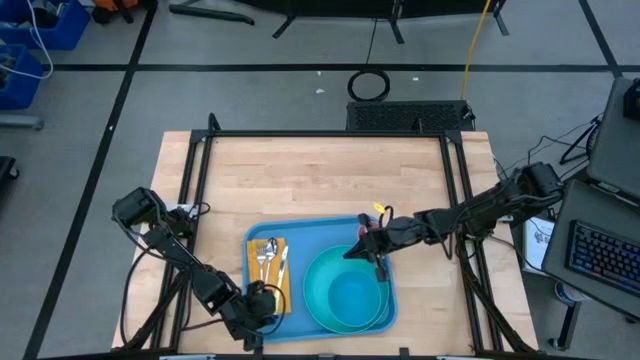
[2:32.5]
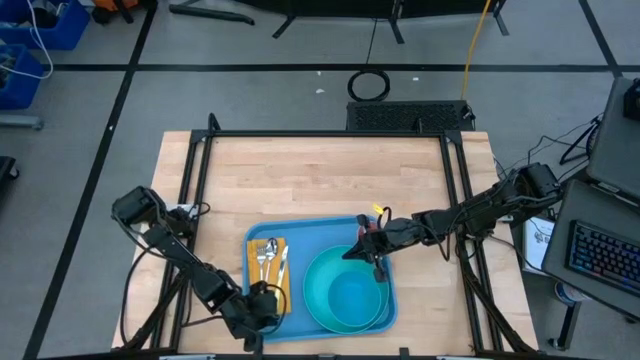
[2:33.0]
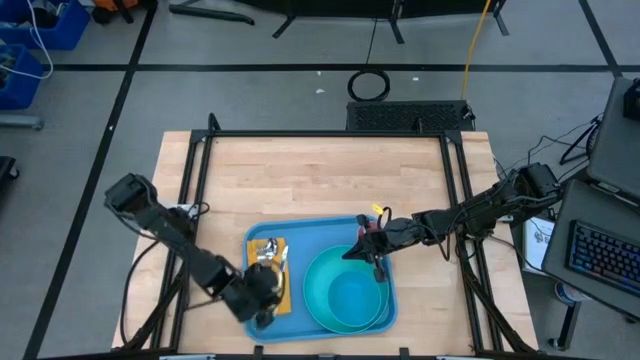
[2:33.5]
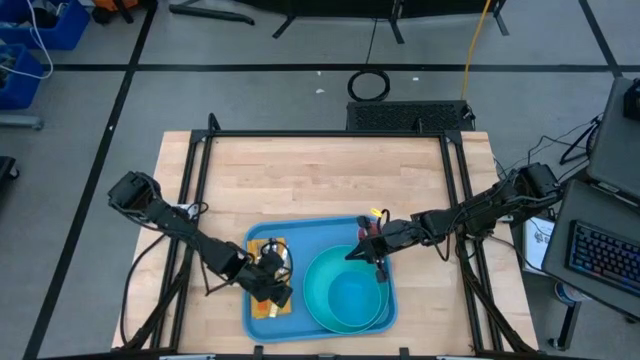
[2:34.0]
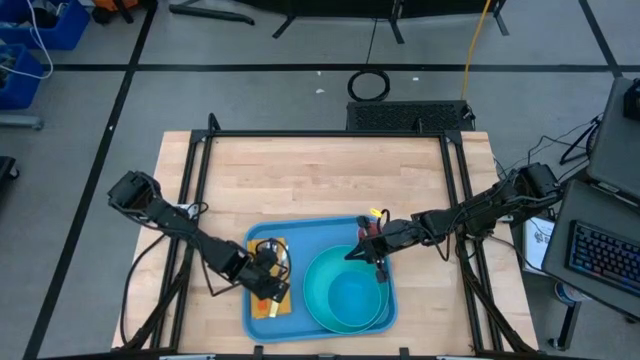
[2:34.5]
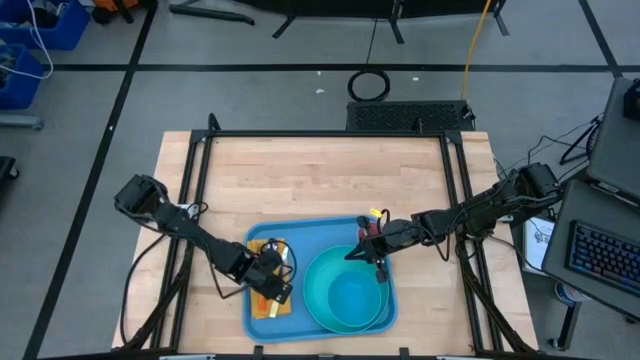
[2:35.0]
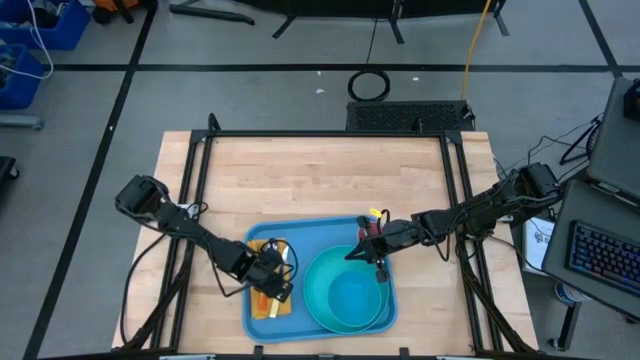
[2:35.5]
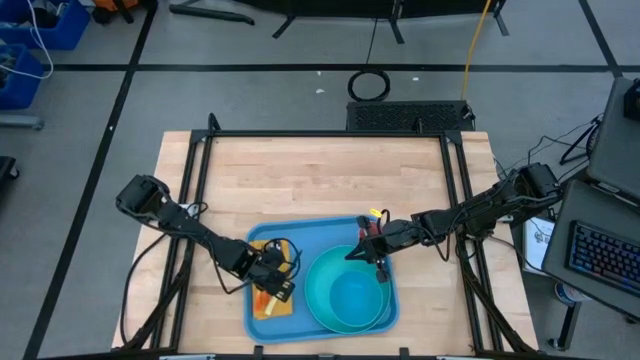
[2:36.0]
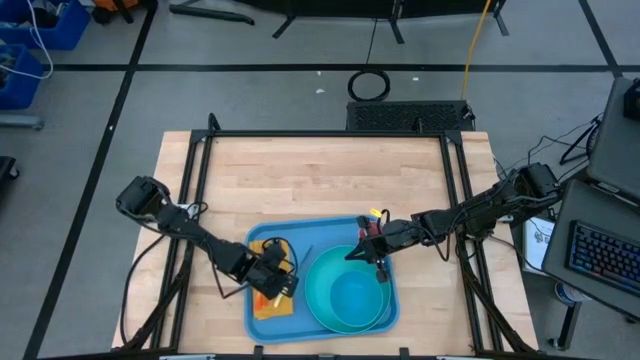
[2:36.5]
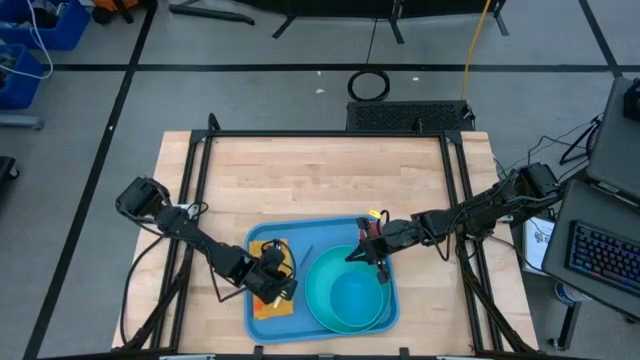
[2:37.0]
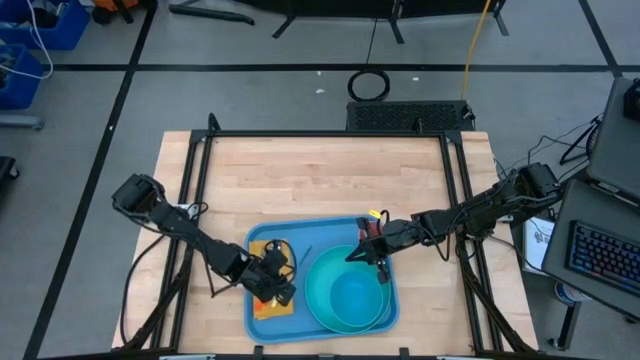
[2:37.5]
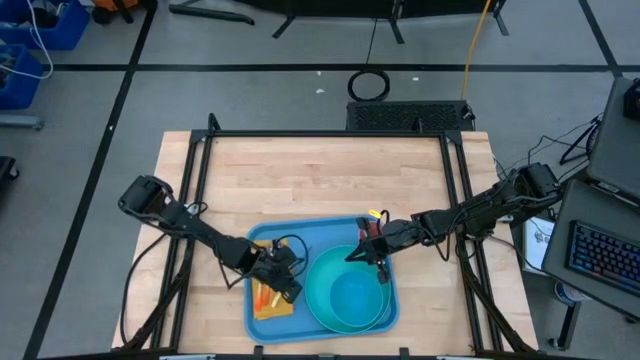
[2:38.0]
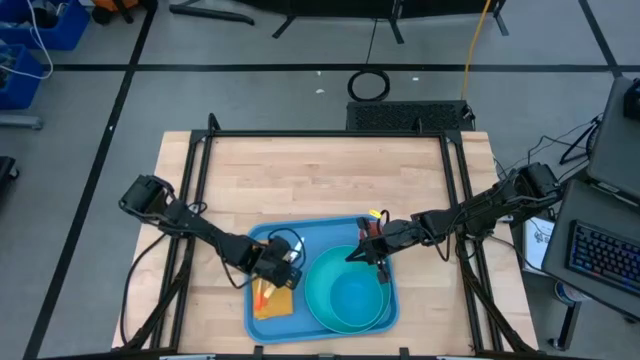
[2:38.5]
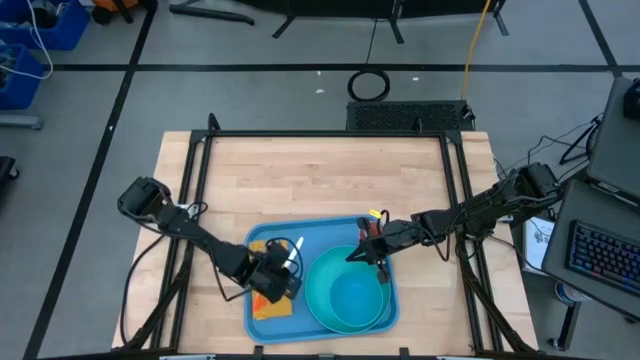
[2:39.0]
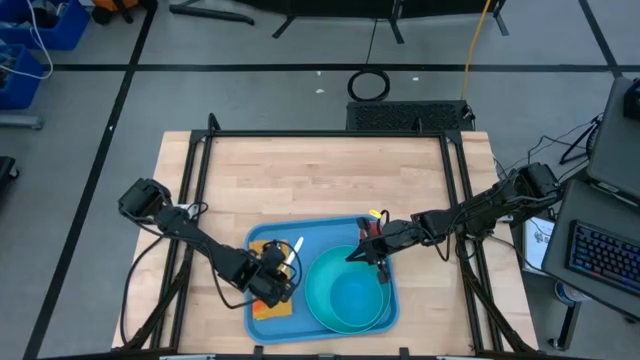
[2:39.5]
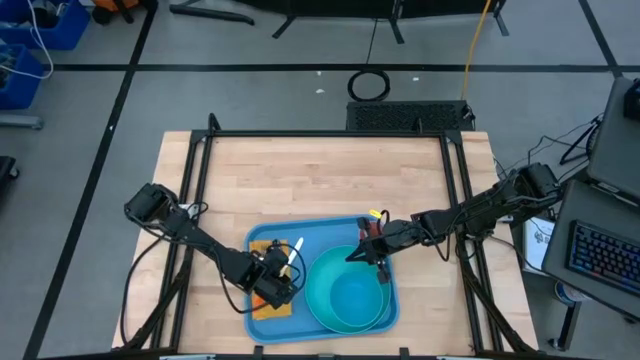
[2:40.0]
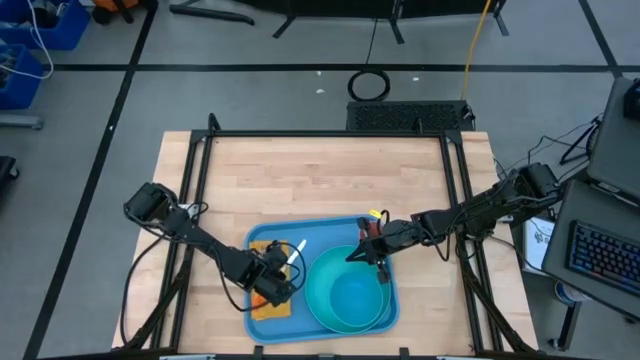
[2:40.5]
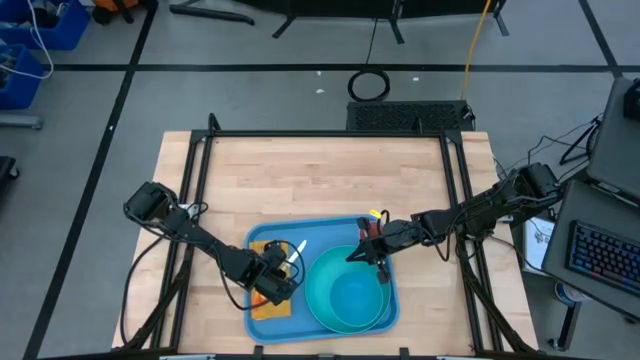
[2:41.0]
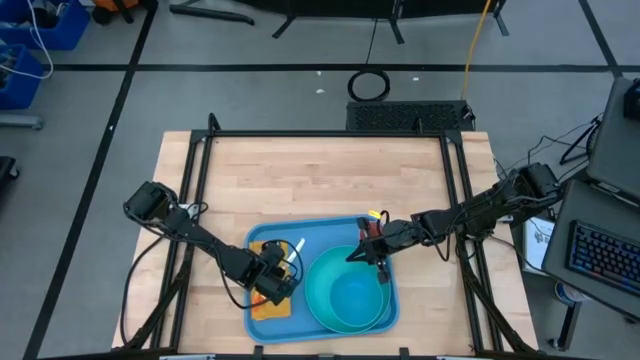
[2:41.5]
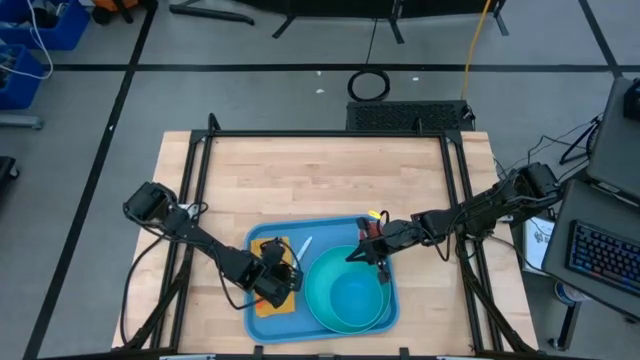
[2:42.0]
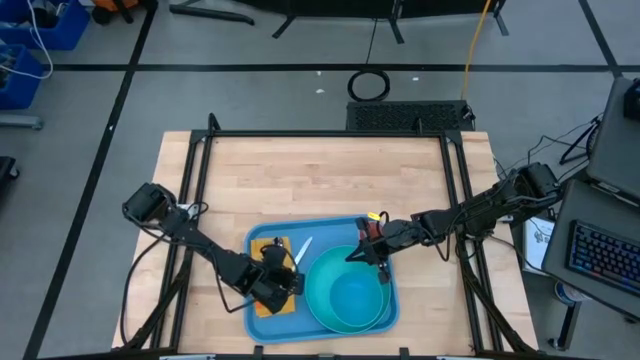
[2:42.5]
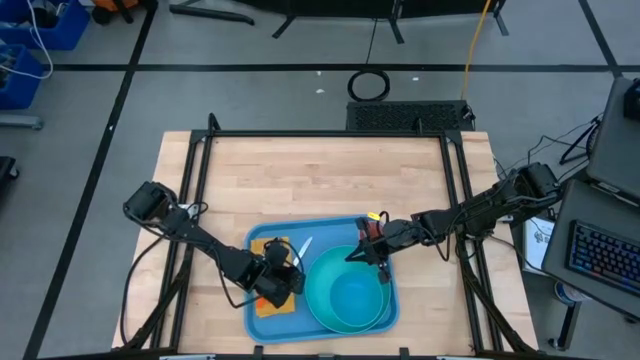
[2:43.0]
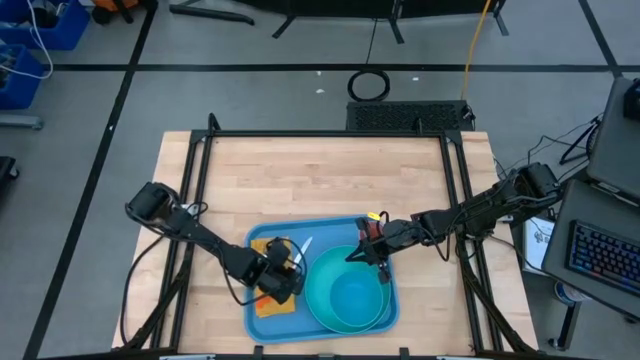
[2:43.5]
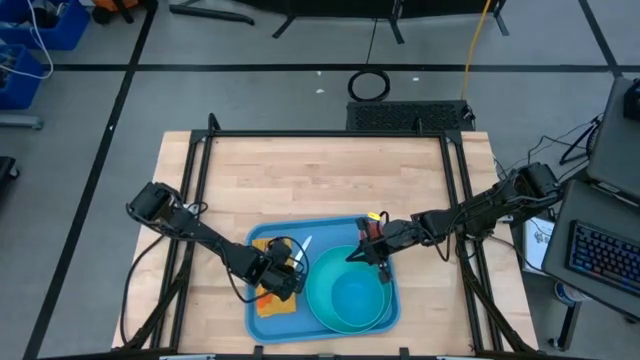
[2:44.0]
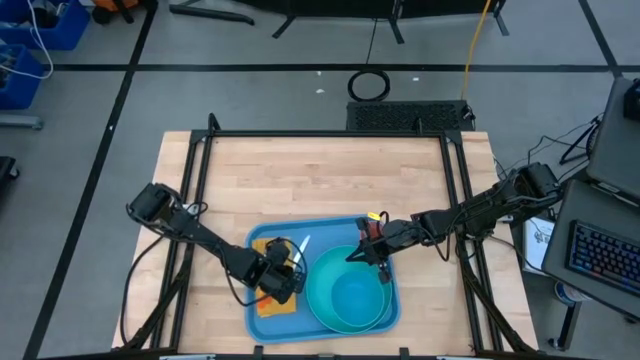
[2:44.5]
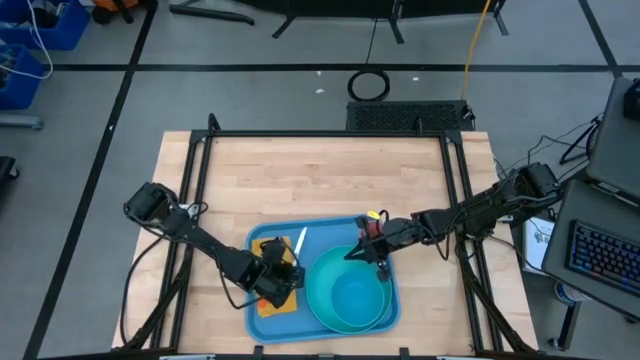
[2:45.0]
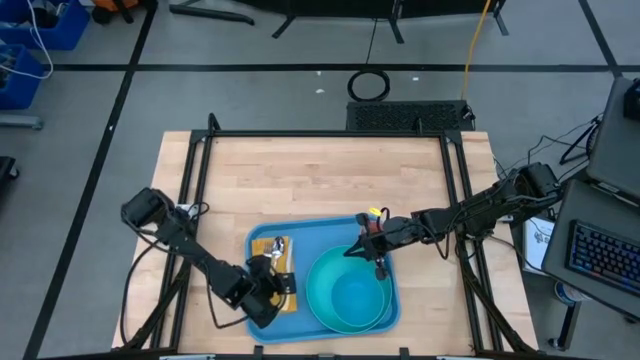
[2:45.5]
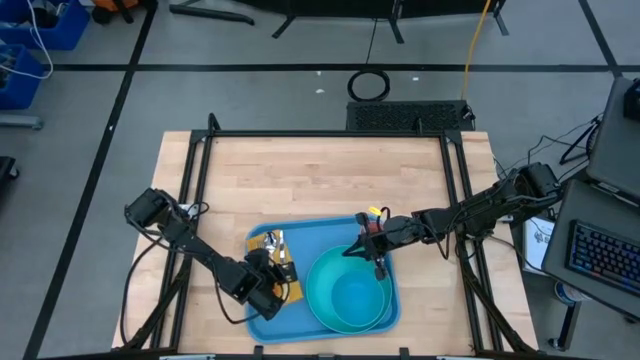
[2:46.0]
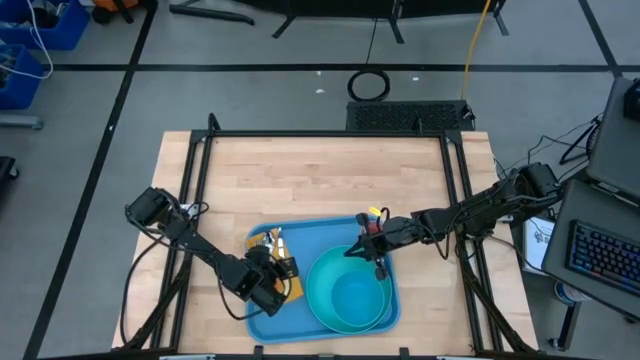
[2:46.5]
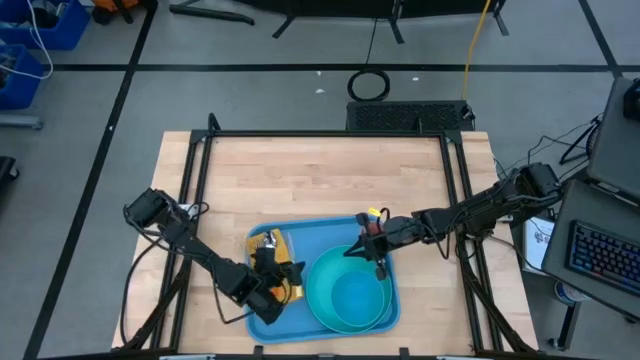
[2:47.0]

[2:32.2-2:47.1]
Task: Set up tray
Adjust the white table knife on the top of the yellow table napkin

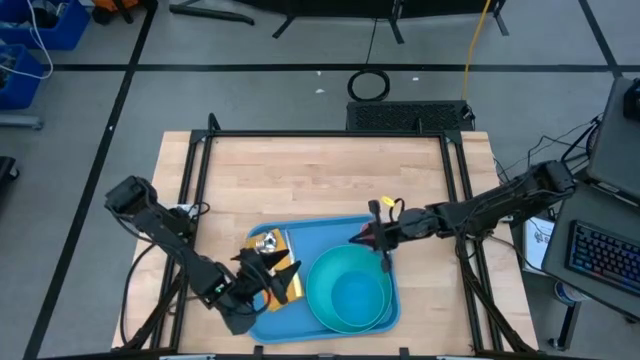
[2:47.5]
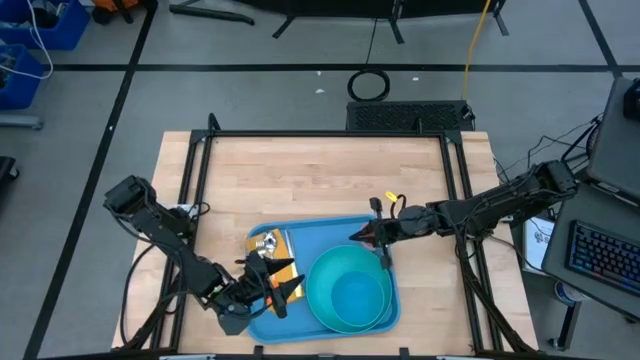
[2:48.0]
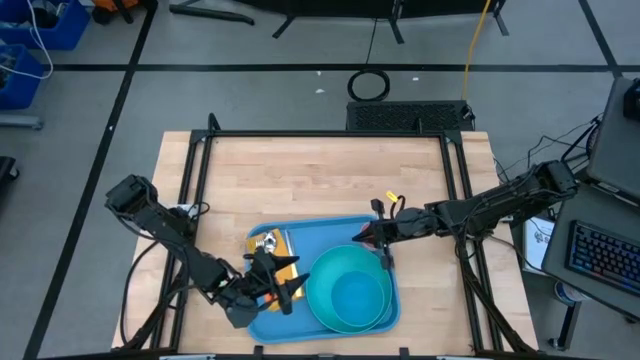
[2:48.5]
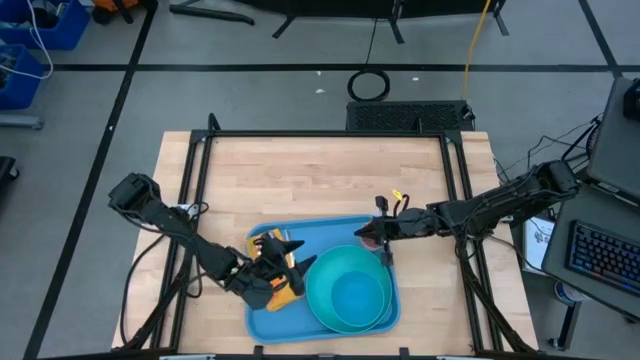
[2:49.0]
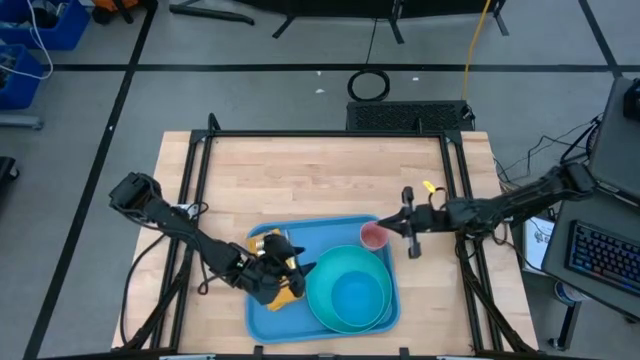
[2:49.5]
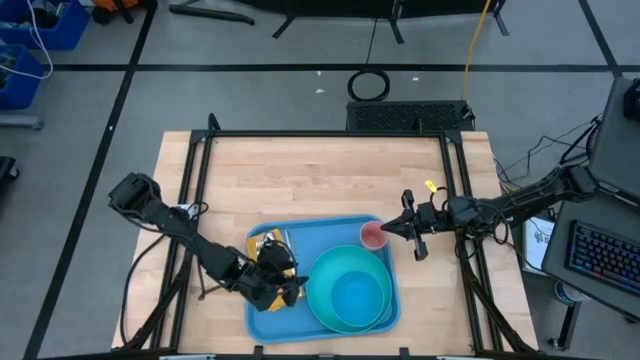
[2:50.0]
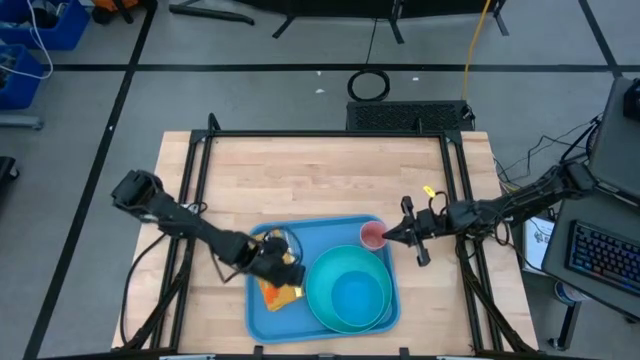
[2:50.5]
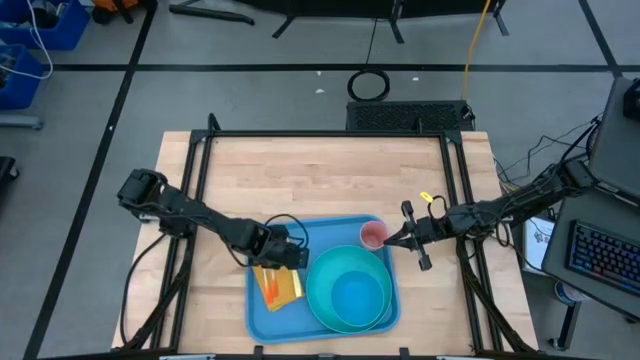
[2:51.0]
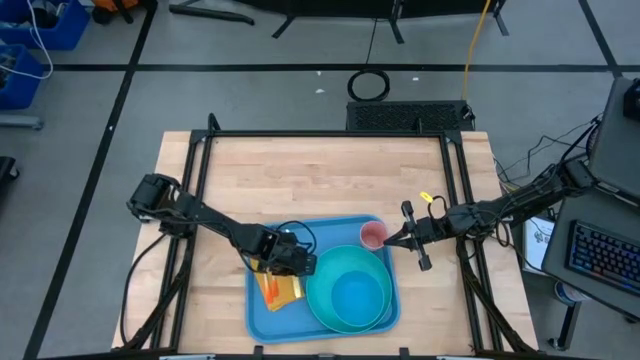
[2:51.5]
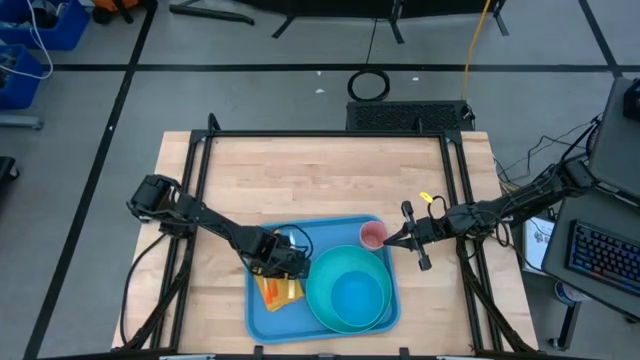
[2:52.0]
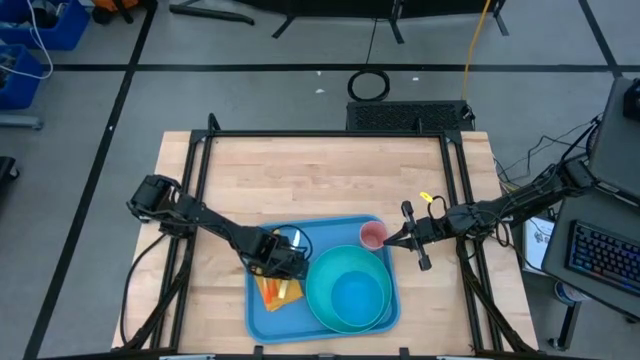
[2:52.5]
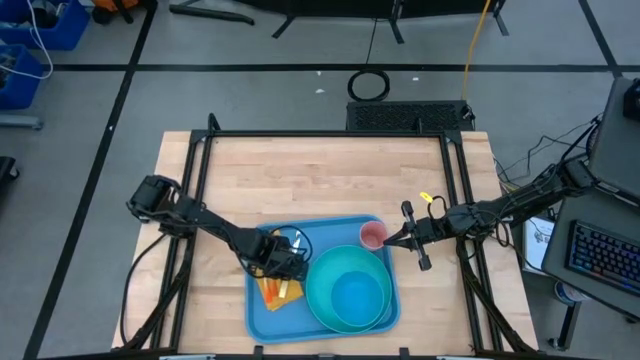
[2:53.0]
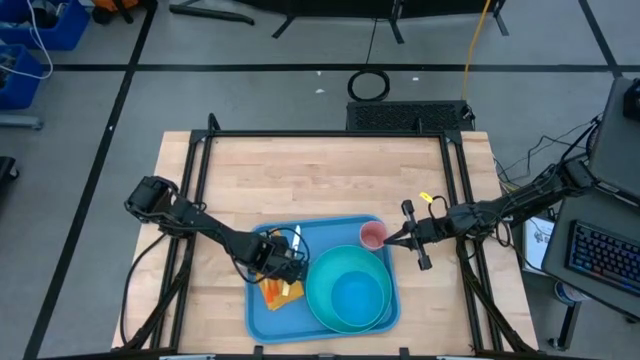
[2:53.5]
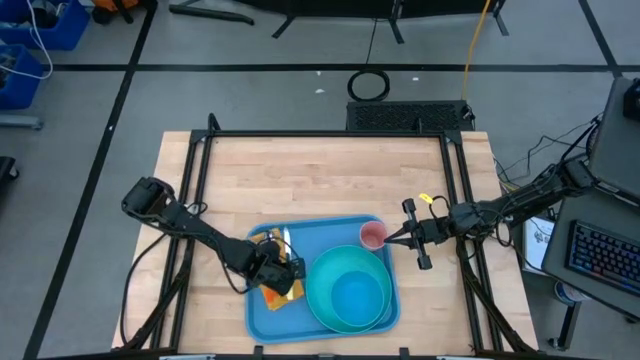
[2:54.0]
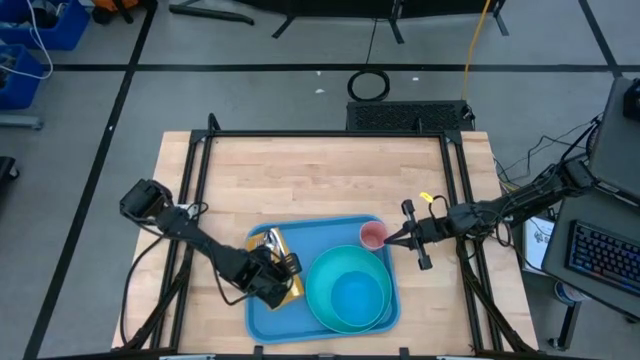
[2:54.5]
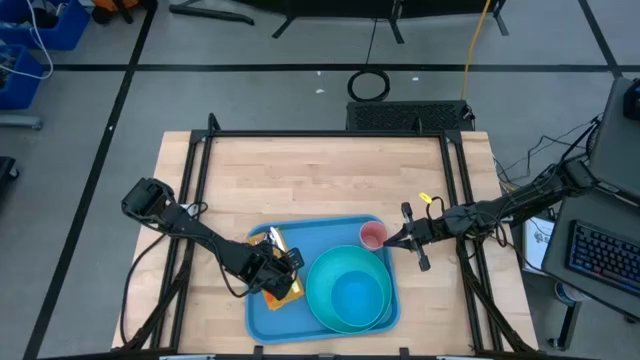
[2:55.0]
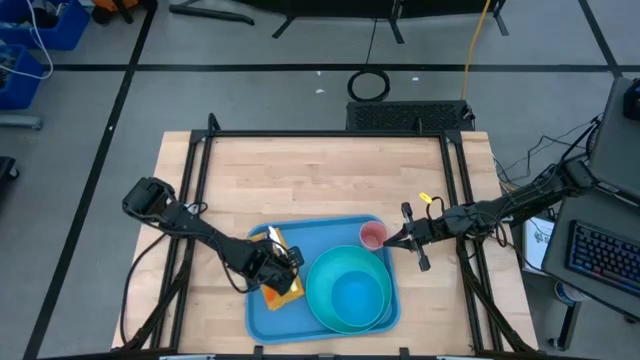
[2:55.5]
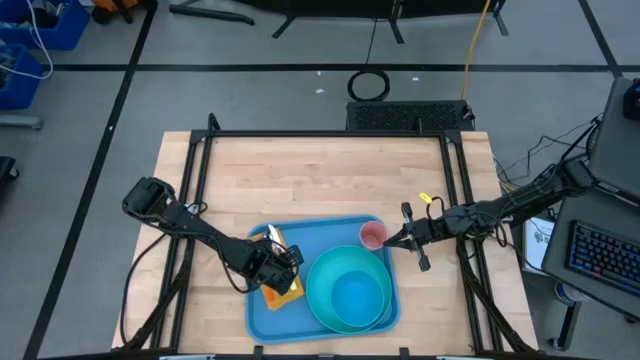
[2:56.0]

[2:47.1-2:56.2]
Adjust the white table knife on the top of the yellow table napkin
